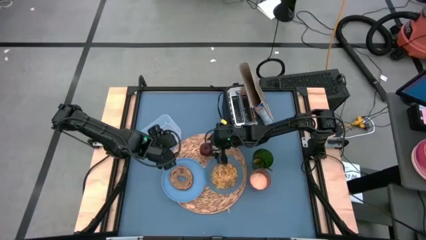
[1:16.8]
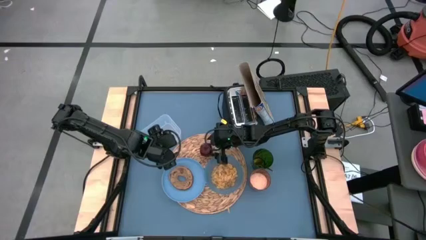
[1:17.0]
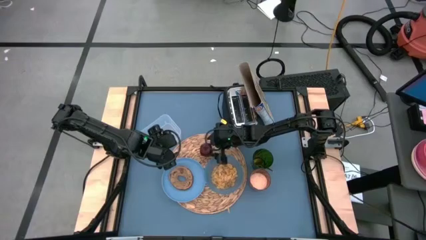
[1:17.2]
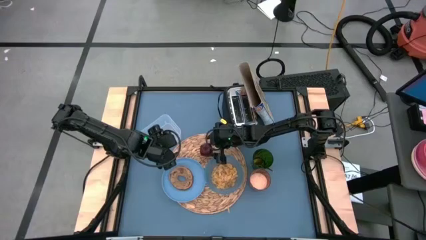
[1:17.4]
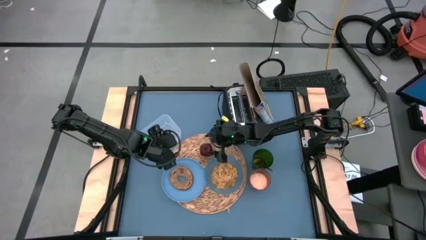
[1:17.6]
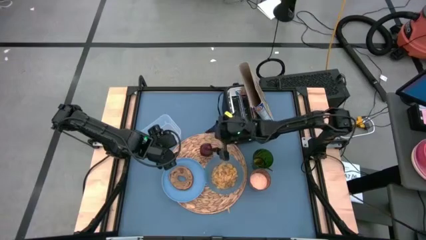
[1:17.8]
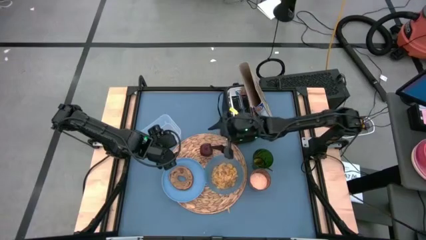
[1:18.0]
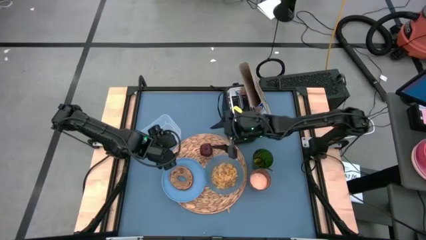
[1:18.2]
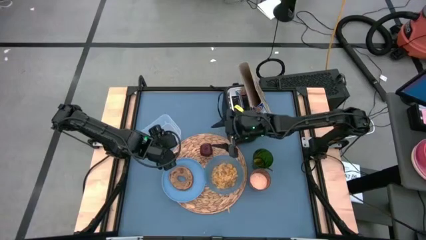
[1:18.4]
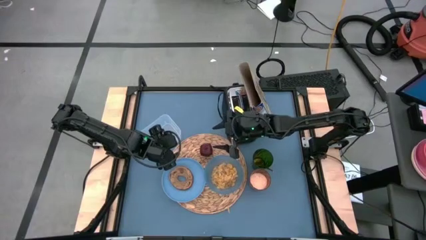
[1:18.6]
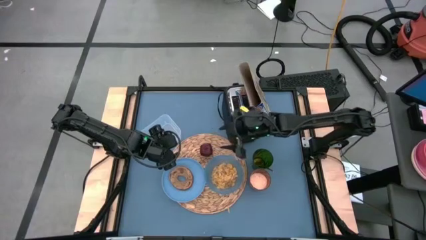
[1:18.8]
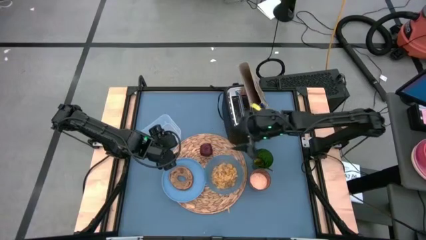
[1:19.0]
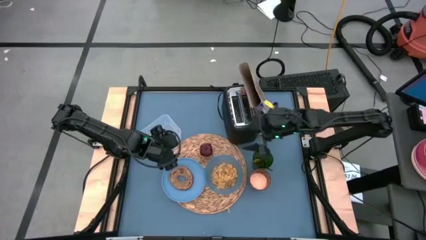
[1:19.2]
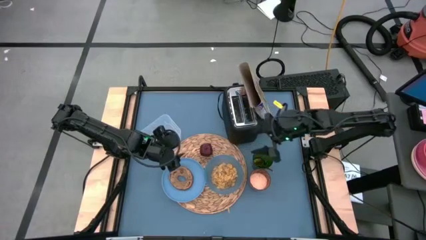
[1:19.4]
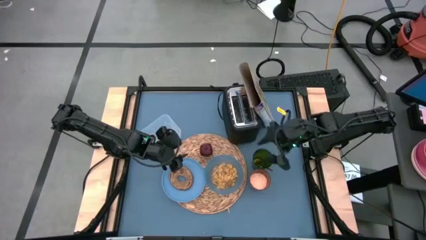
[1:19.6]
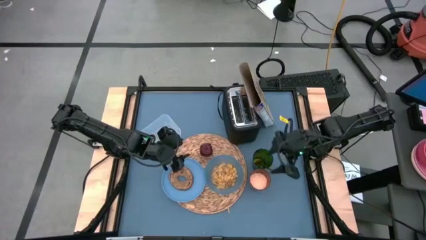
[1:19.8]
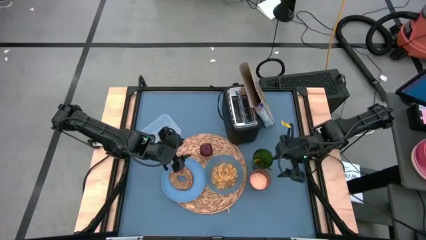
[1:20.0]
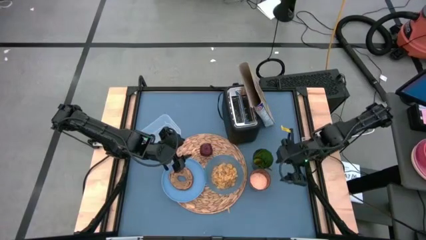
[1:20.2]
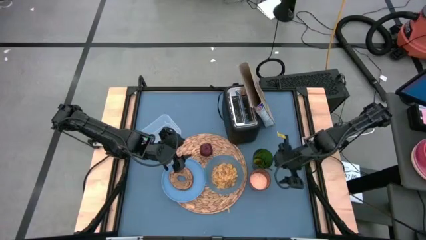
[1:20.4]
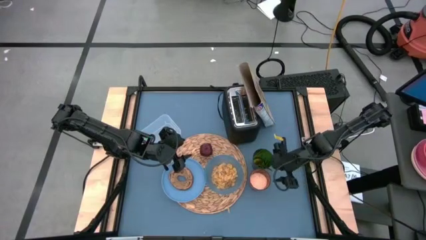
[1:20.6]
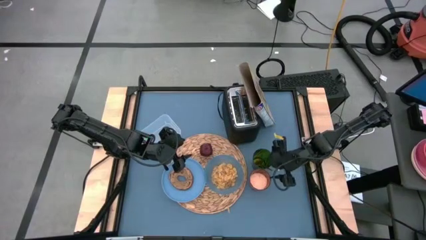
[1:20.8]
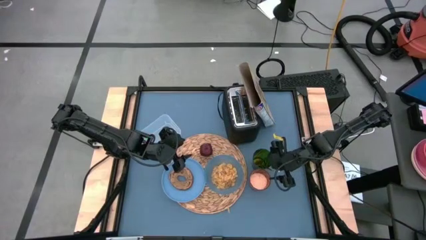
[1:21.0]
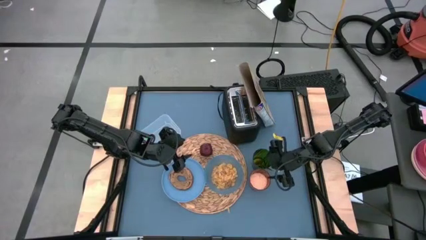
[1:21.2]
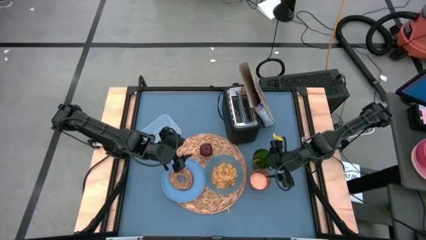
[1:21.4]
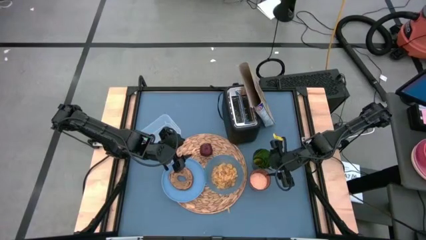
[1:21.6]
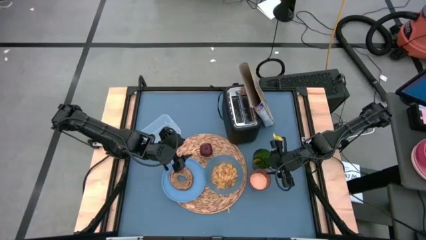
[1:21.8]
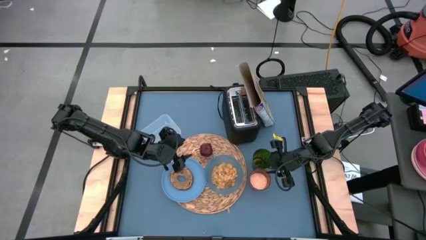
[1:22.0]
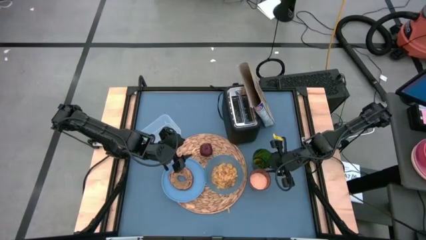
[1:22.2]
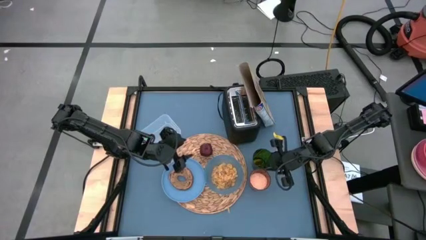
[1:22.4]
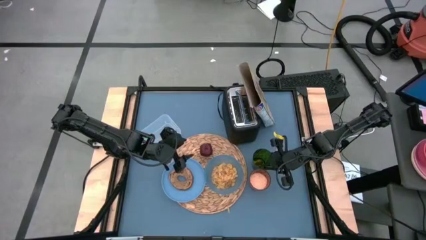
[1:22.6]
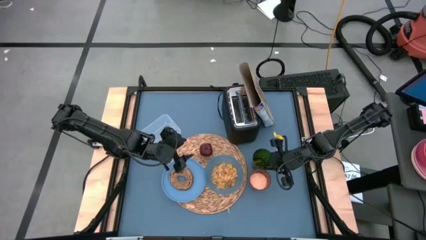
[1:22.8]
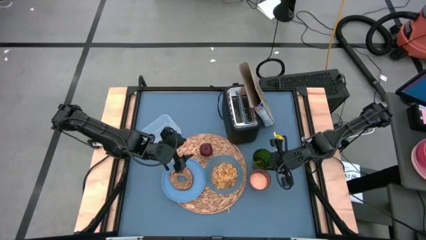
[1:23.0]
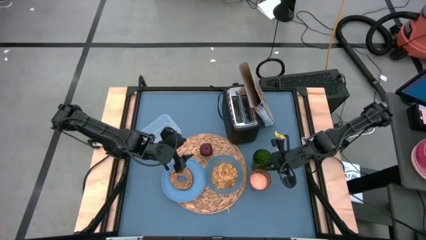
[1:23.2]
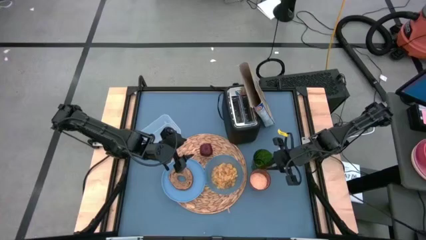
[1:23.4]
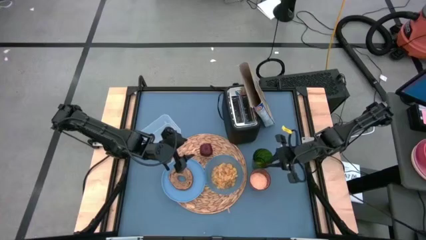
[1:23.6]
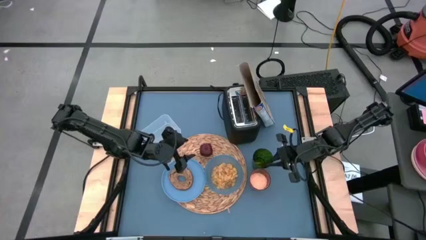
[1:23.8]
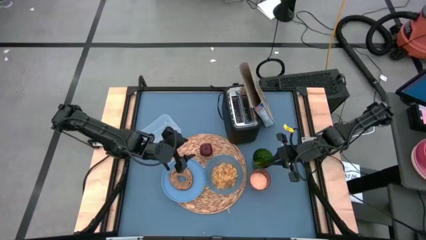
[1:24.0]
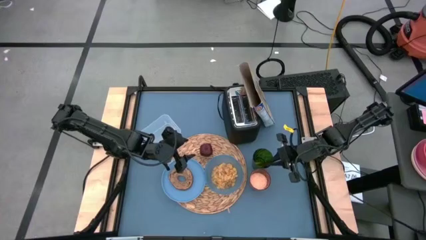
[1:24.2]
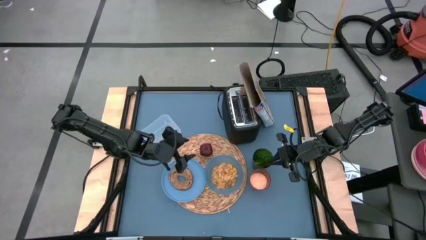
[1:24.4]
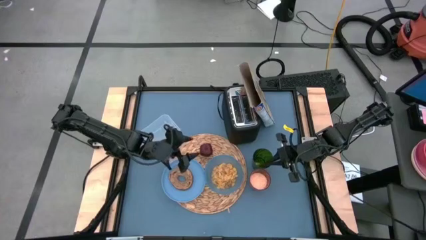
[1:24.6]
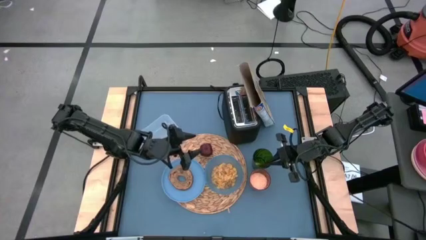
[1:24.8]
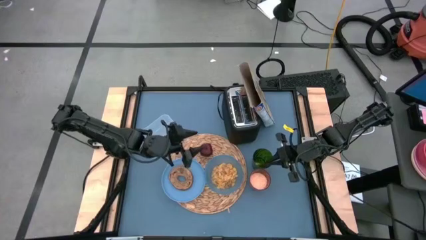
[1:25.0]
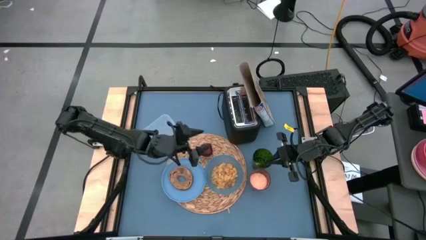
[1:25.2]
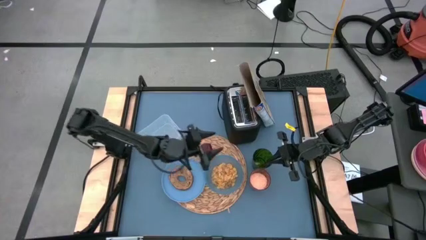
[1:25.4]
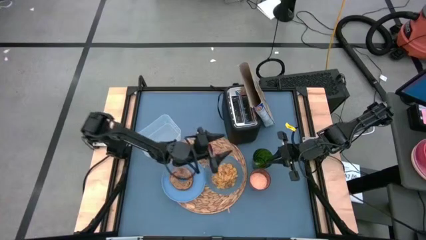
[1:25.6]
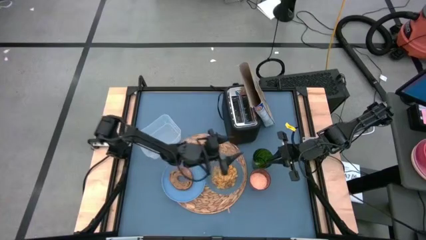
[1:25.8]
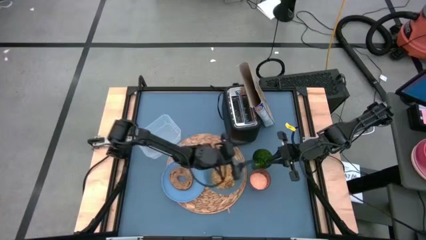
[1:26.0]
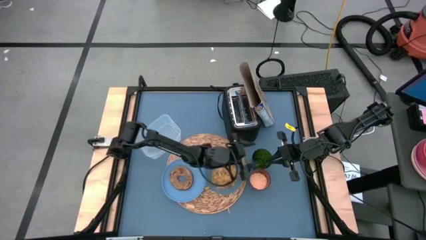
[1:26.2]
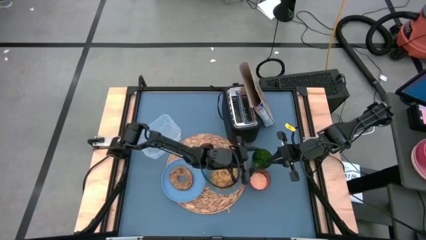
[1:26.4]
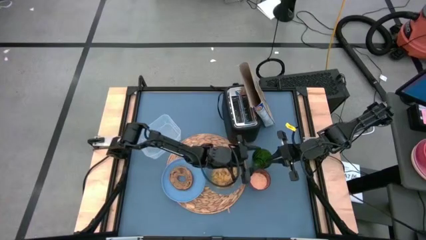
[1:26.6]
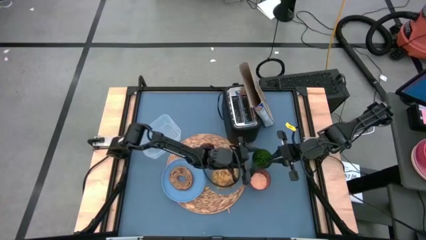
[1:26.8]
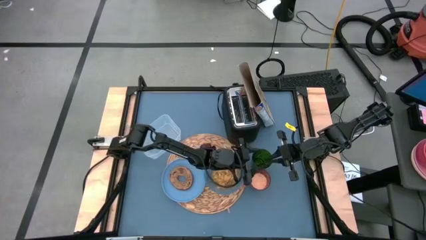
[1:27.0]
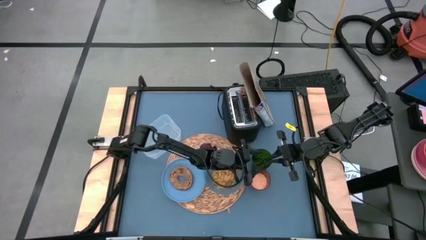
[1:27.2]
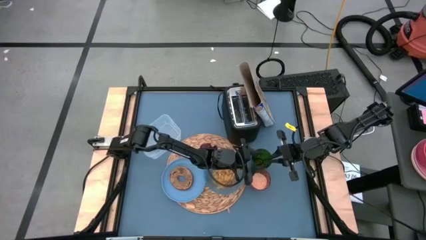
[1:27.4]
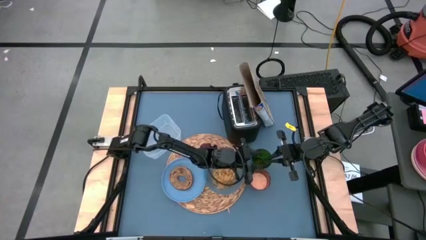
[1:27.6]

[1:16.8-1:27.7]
Task: Arrange a breakfast setting
Put the gold spoon on the right side of the blue bowl
